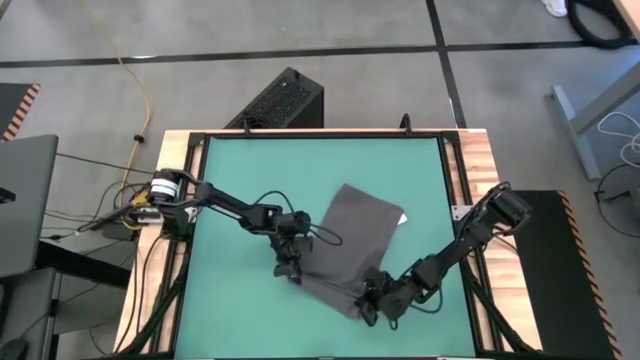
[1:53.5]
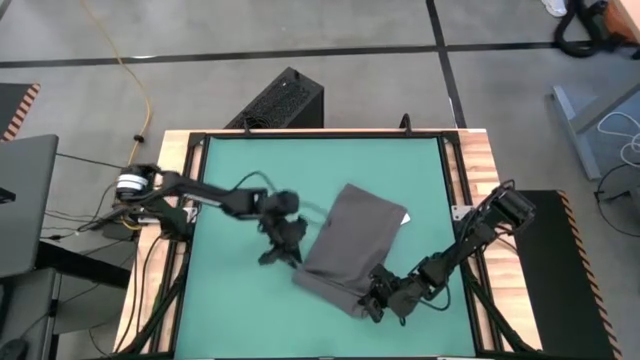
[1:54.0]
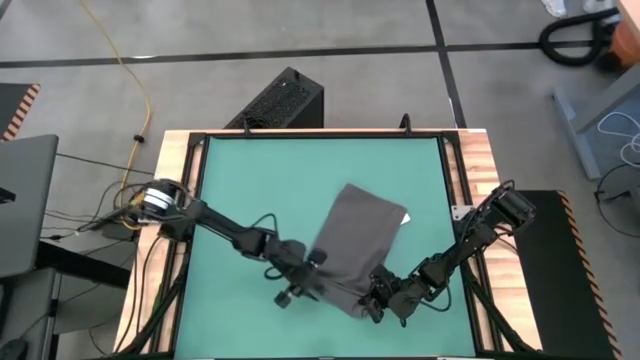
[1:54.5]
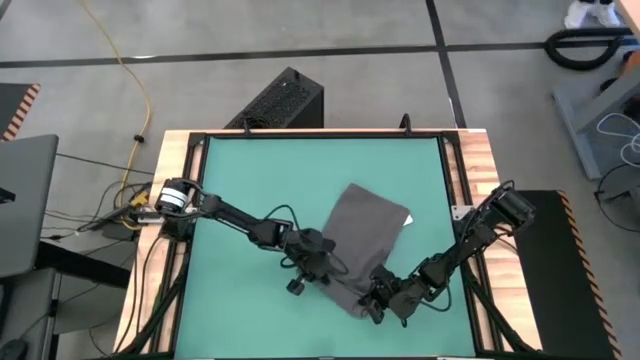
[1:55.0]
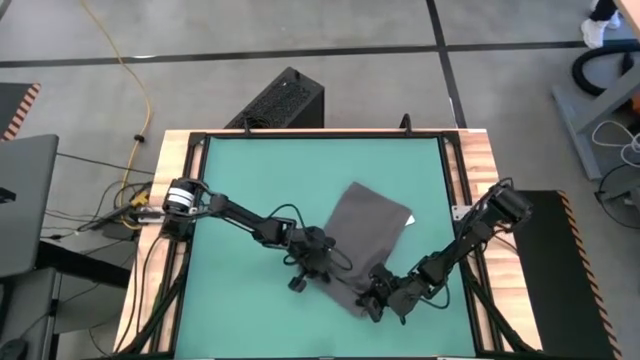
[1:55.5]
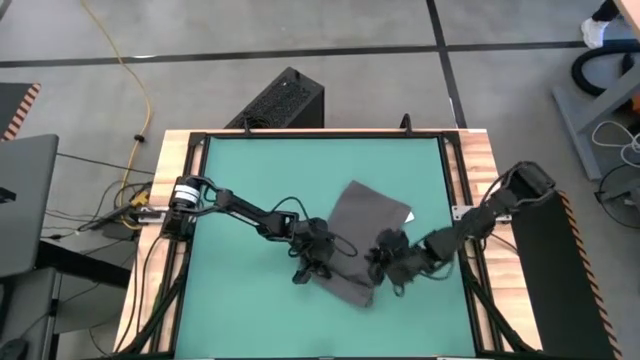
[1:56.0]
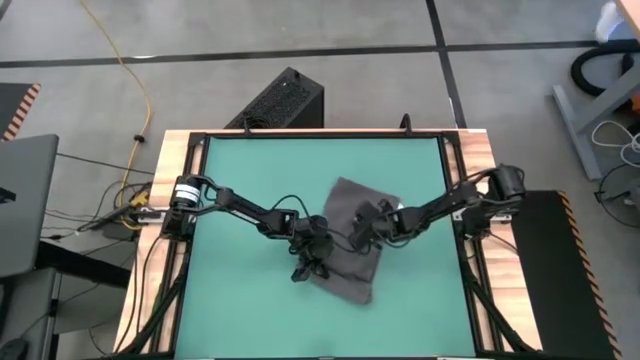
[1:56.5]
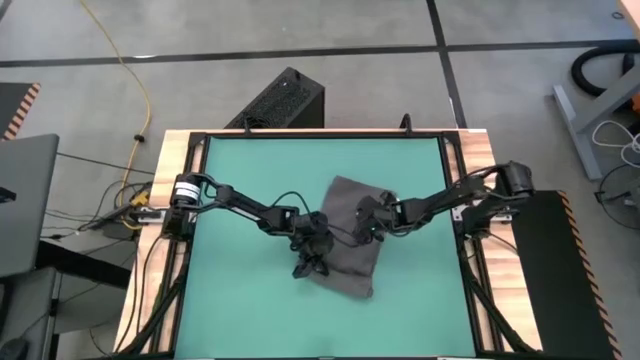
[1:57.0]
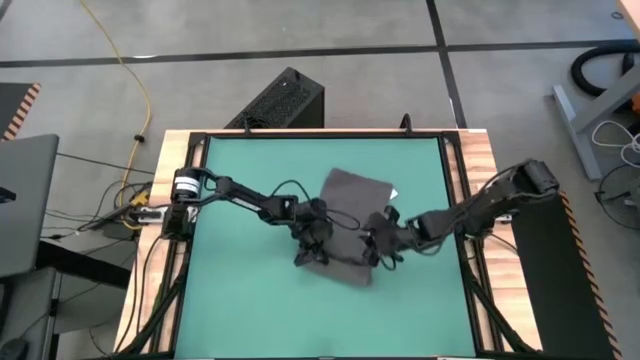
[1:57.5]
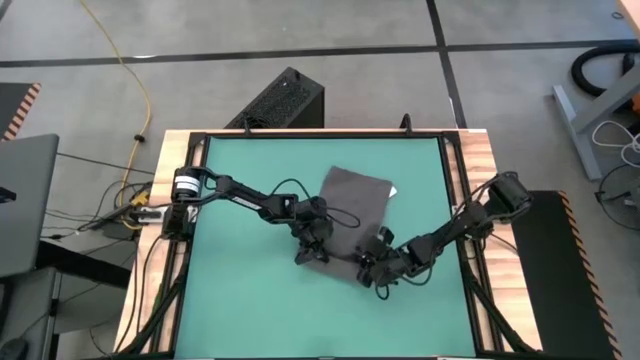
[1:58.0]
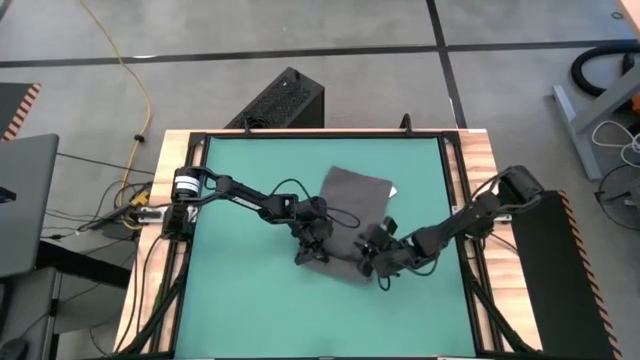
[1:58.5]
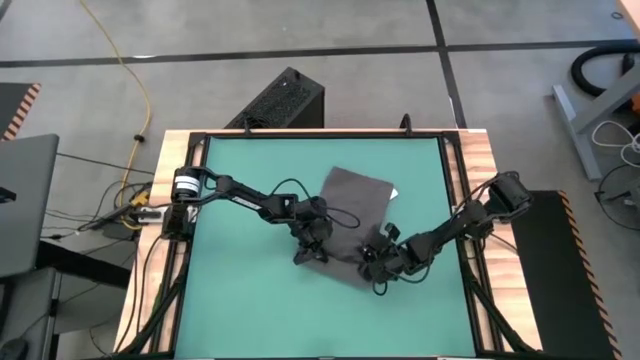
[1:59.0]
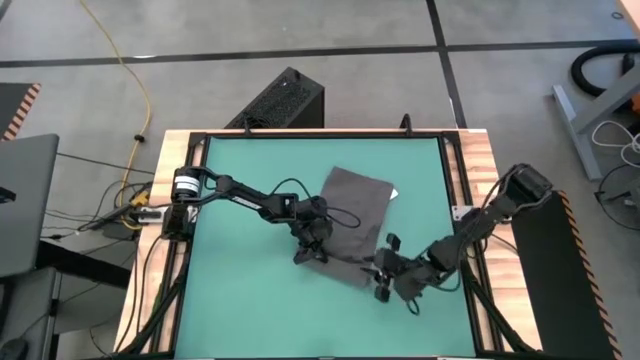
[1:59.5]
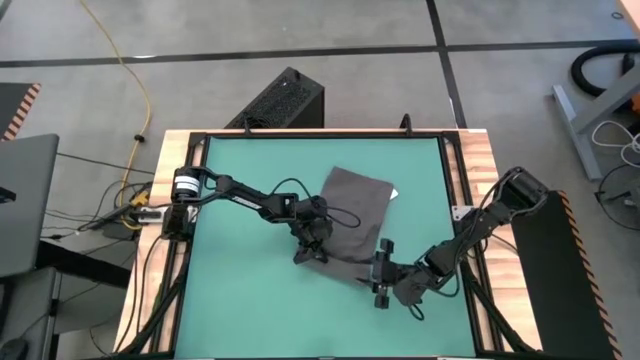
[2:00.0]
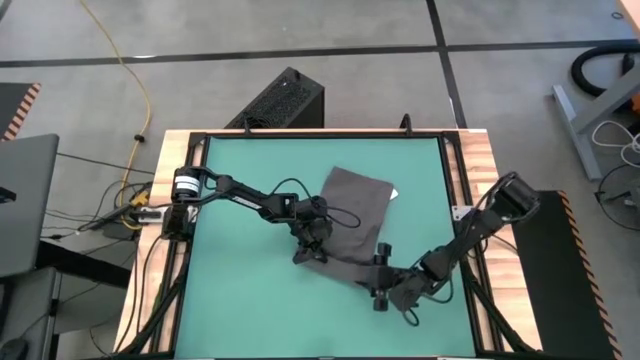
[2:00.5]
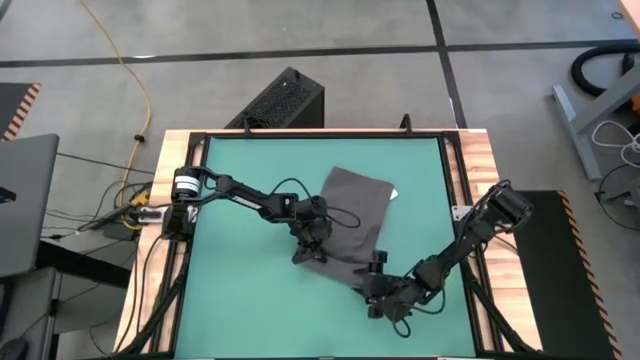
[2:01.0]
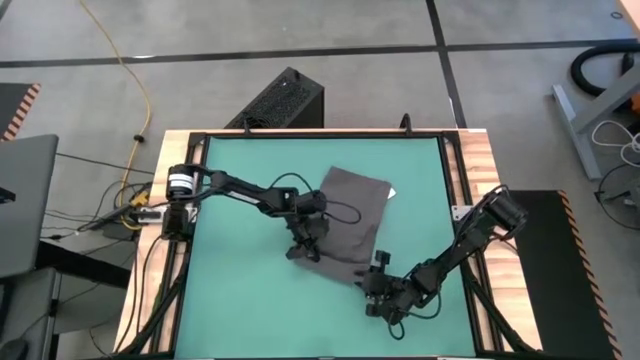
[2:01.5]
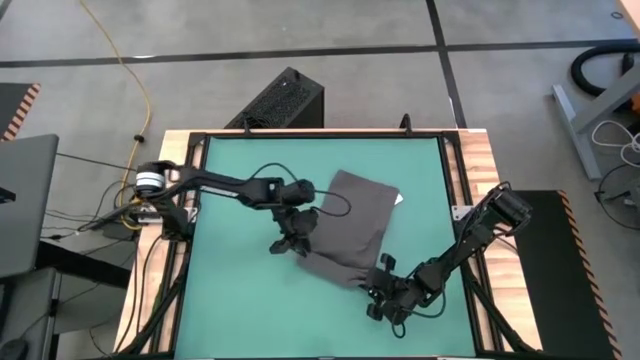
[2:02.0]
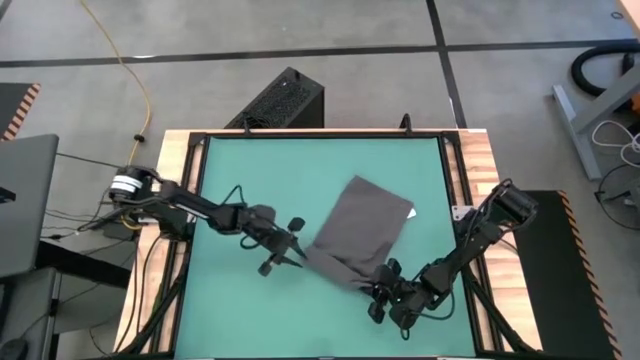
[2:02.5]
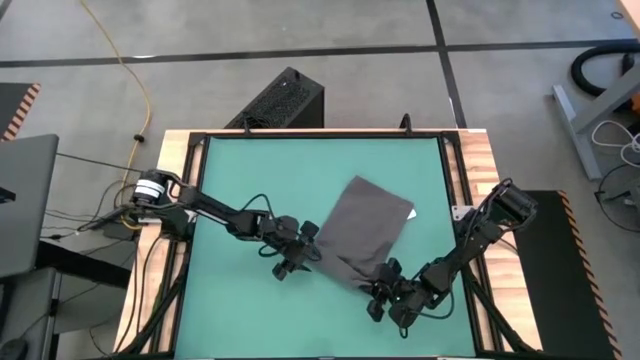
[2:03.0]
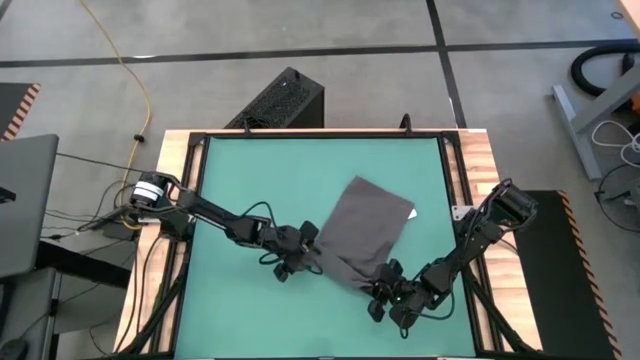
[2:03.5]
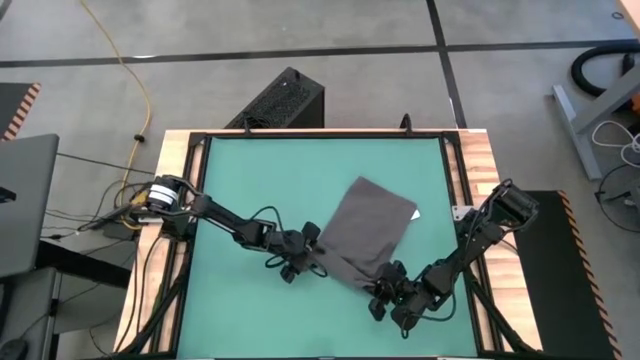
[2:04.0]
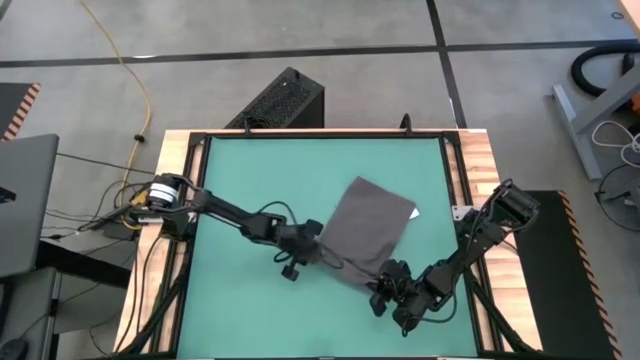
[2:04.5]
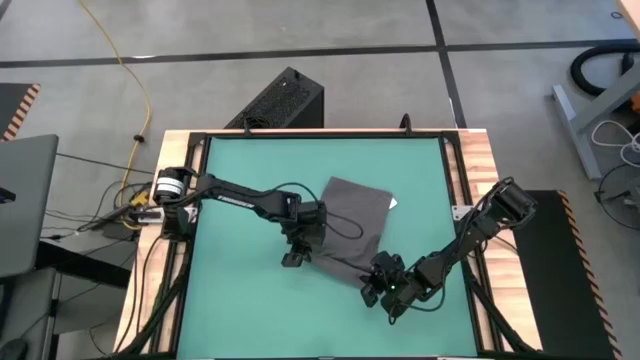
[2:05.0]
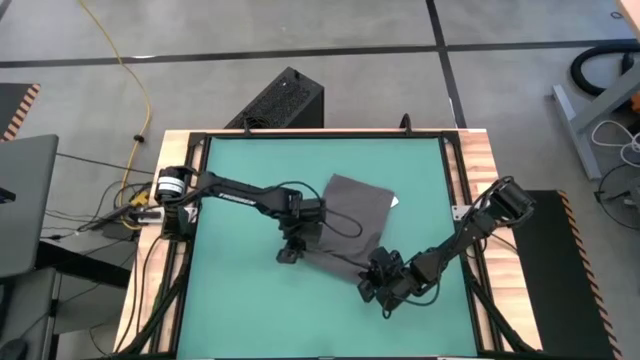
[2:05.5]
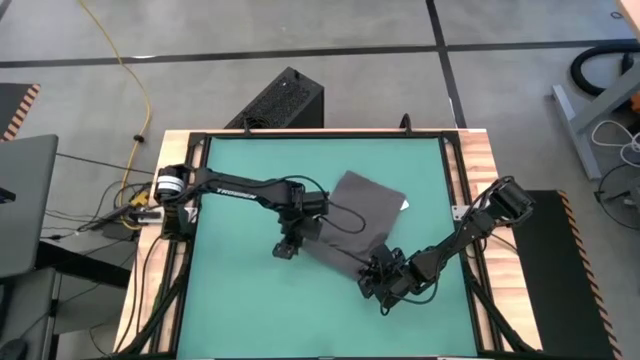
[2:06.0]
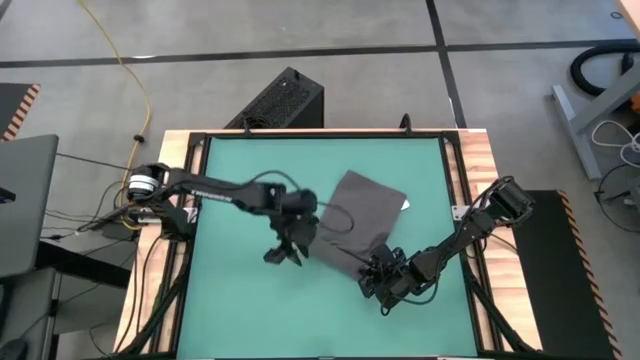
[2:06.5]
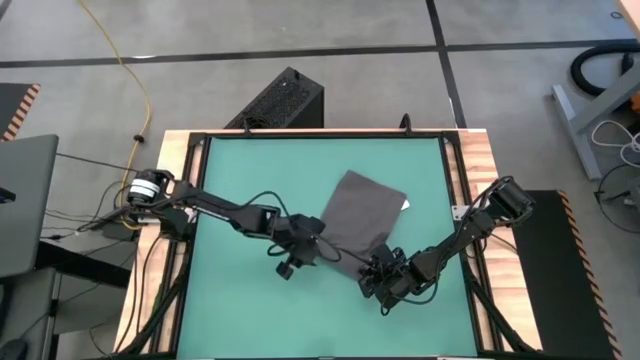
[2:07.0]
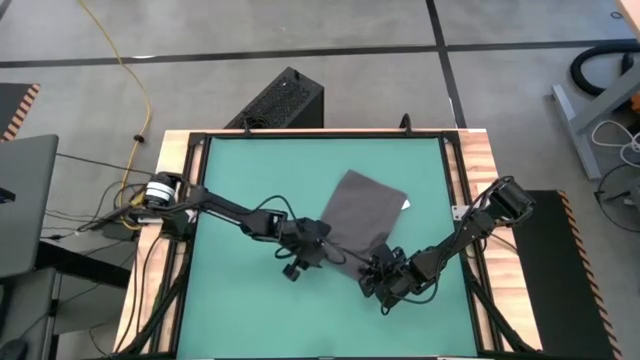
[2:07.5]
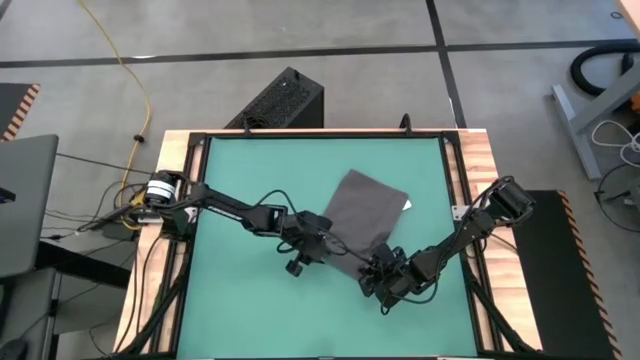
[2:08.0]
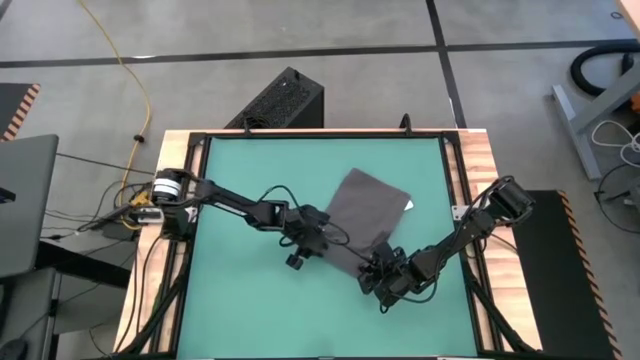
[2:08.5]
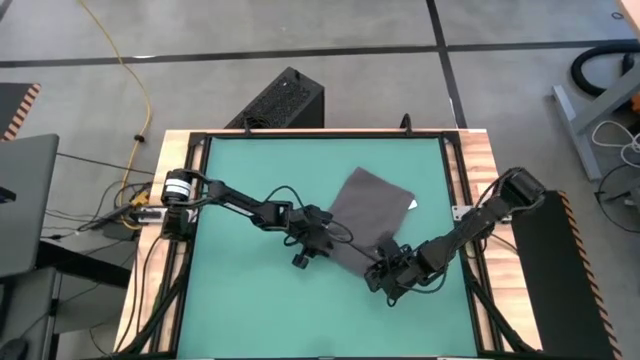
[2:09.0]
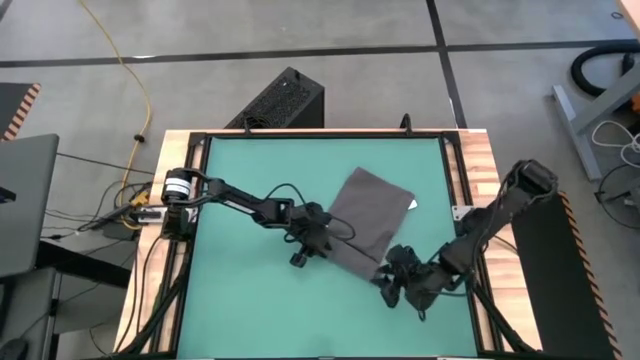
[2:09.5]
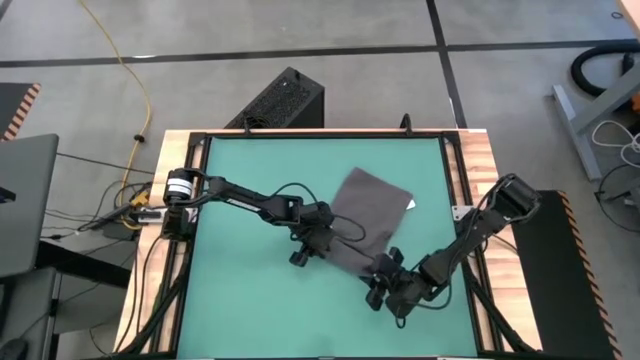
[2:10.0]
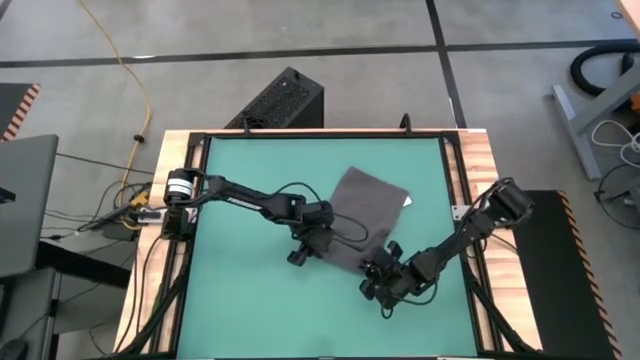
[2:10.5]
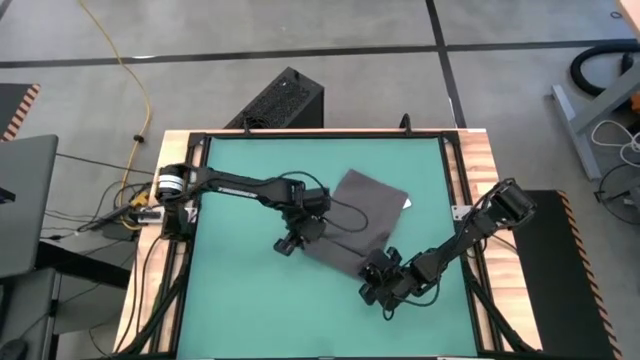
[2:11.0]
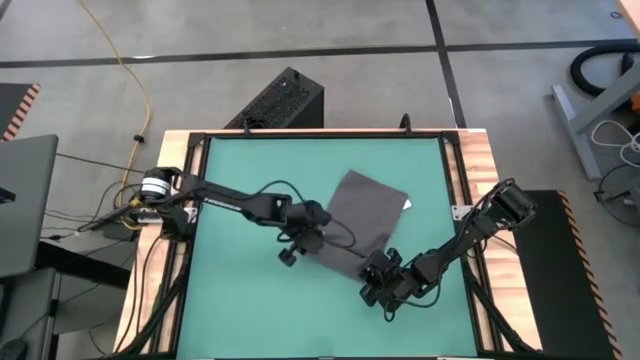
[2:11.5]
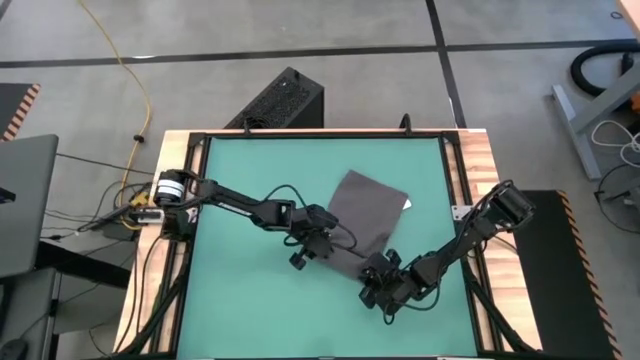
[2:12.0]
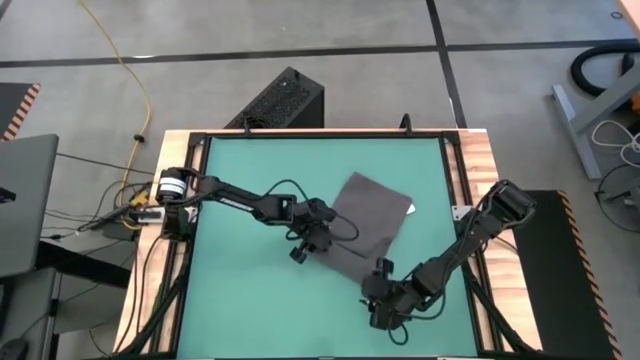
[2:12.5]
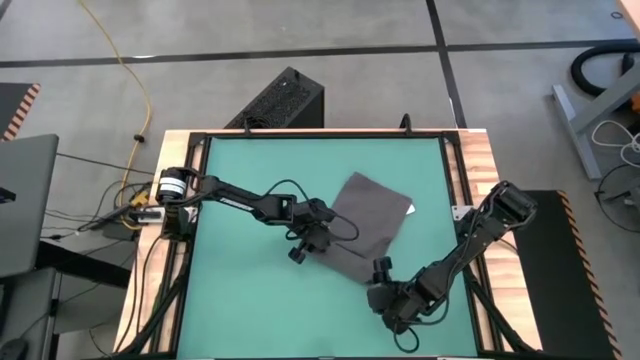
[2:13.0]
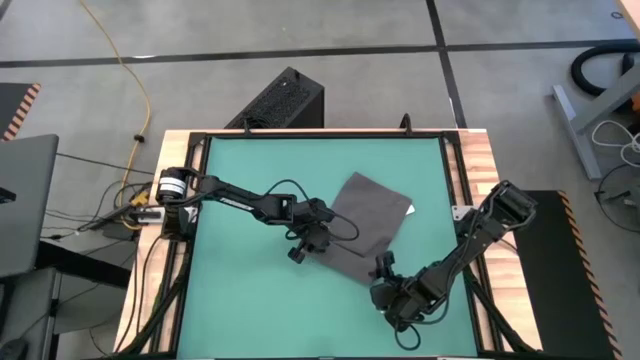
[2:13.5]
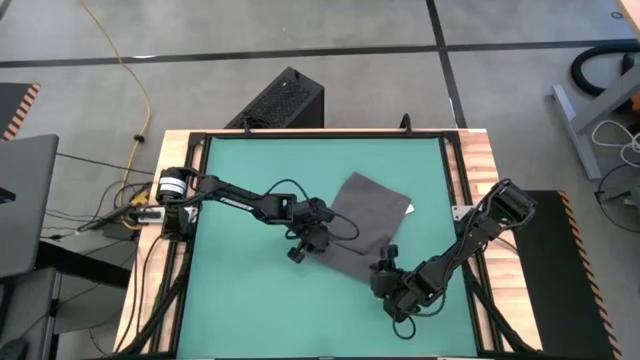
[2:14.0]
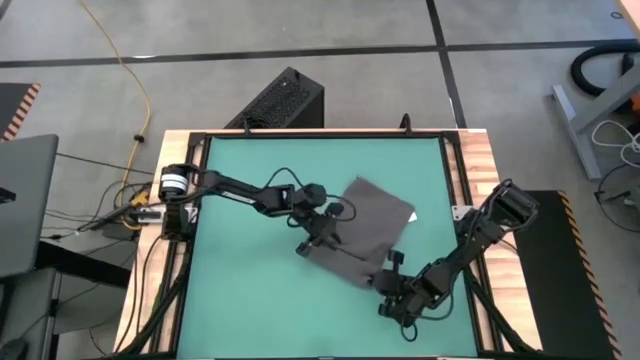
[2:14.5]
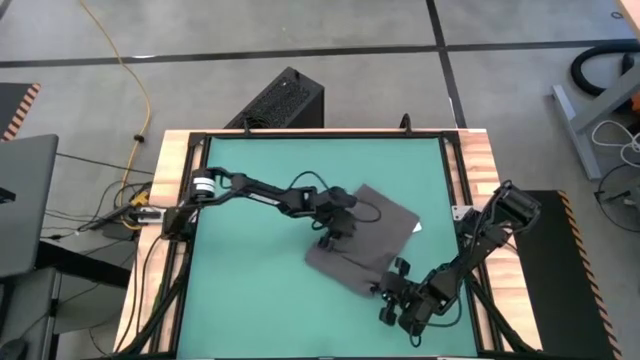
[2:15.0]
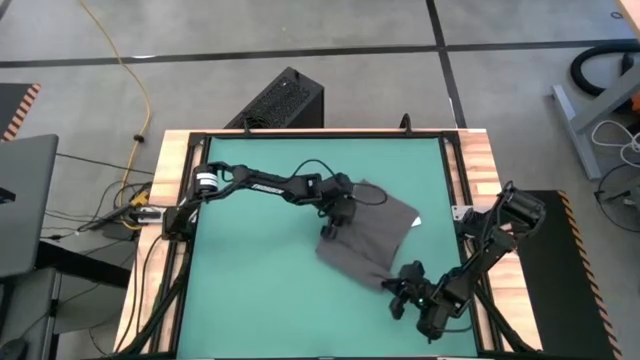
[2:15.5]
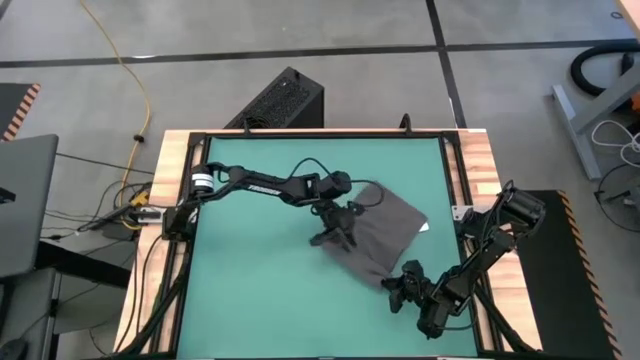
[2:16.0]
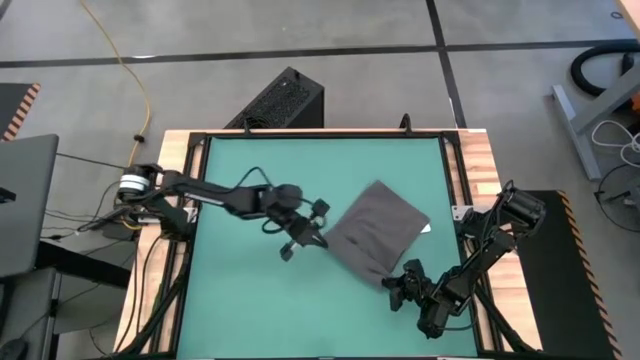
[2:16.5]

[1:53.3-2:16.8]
Task: Roll towel into tight, uniform cylinder
Roll the gray towel
